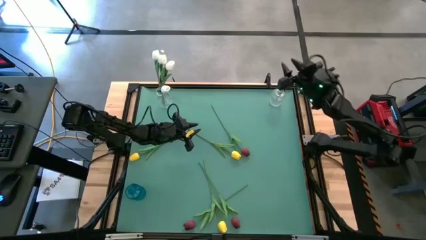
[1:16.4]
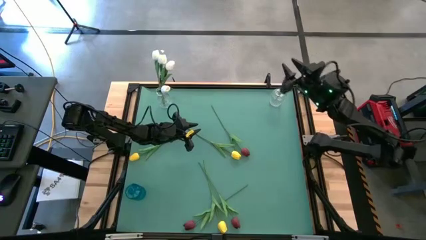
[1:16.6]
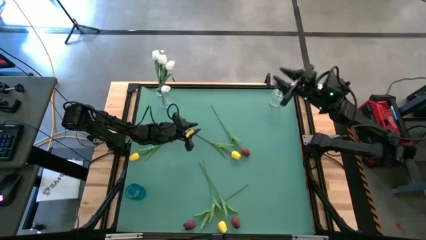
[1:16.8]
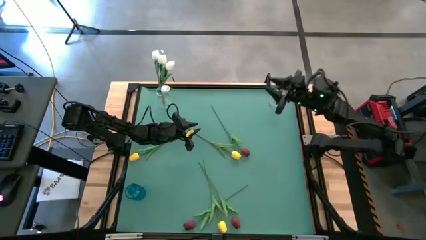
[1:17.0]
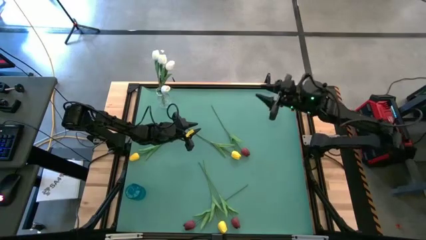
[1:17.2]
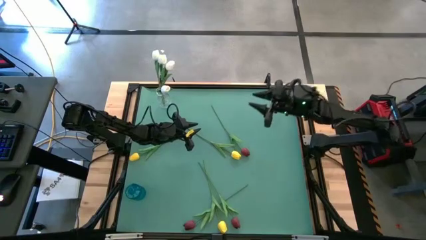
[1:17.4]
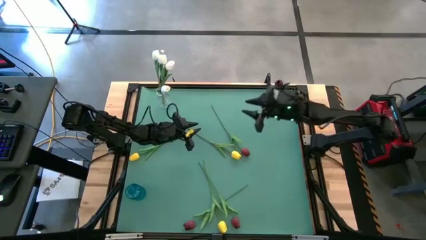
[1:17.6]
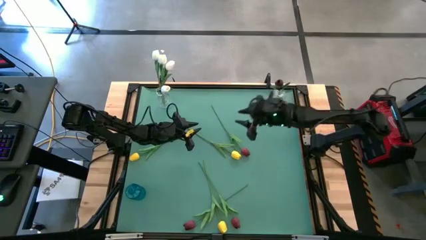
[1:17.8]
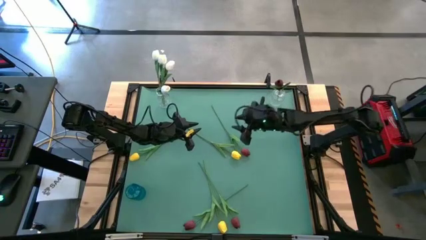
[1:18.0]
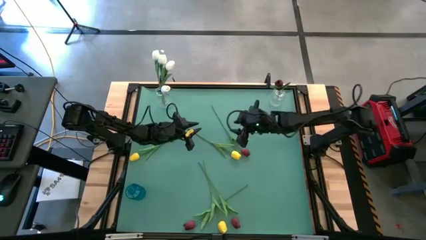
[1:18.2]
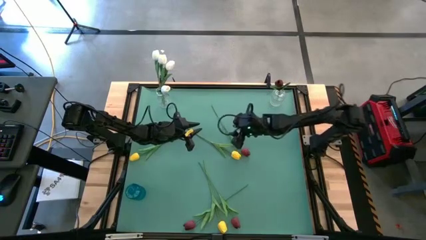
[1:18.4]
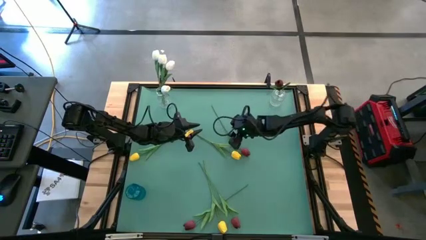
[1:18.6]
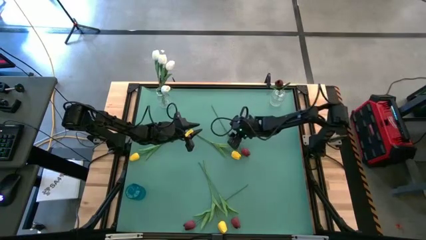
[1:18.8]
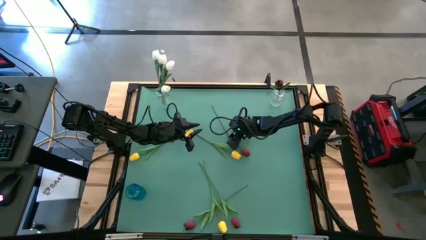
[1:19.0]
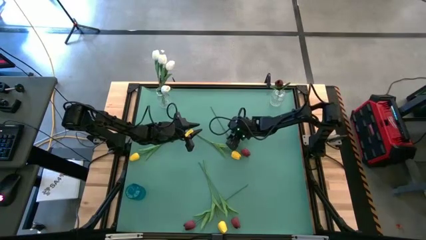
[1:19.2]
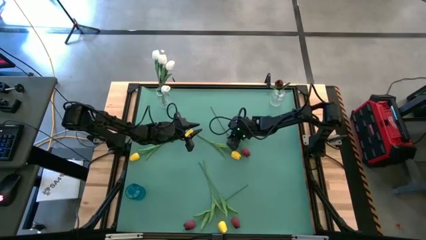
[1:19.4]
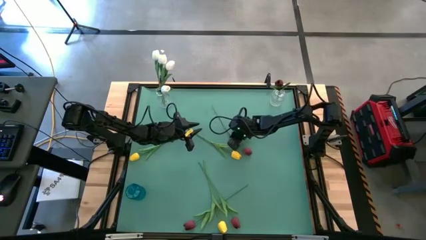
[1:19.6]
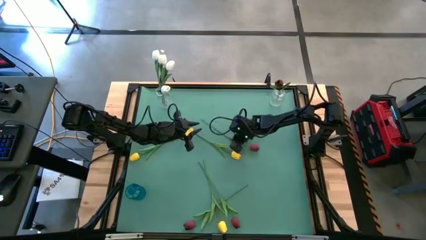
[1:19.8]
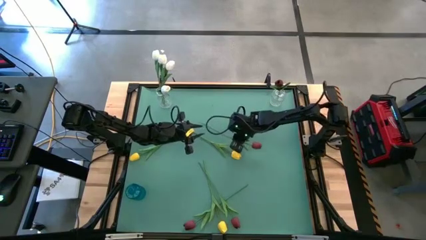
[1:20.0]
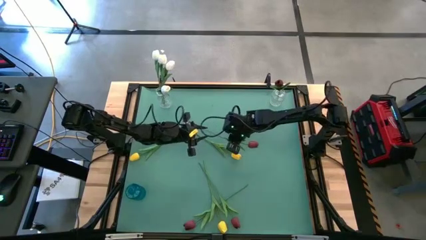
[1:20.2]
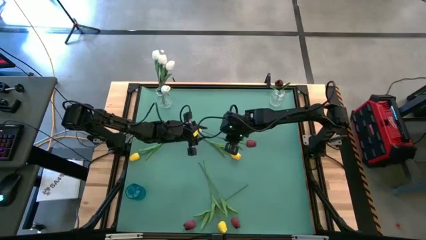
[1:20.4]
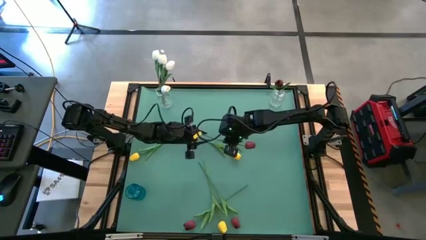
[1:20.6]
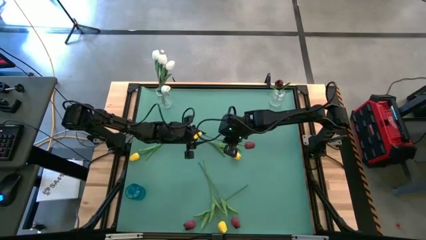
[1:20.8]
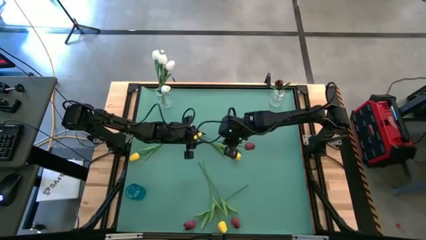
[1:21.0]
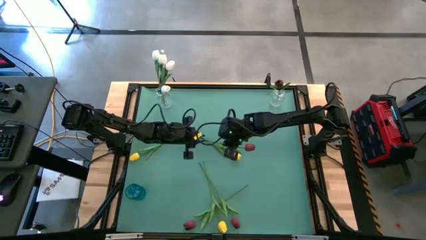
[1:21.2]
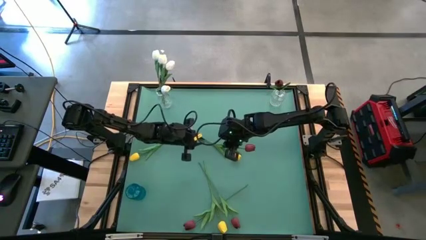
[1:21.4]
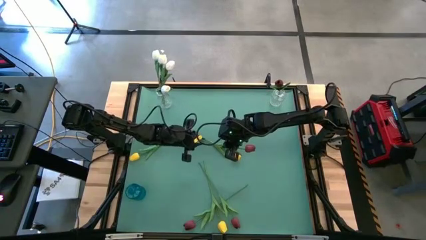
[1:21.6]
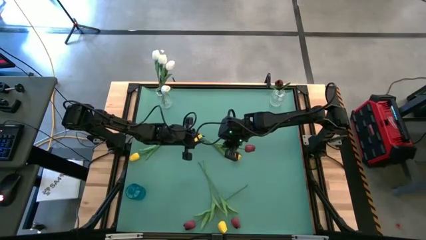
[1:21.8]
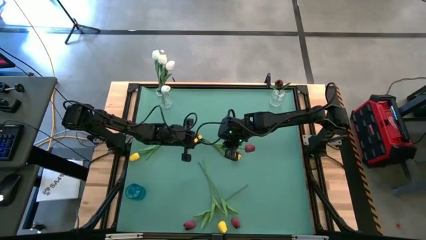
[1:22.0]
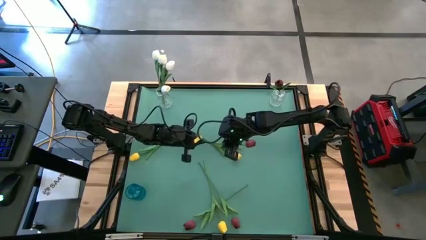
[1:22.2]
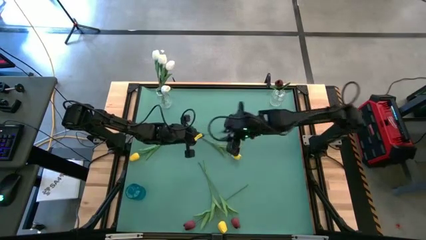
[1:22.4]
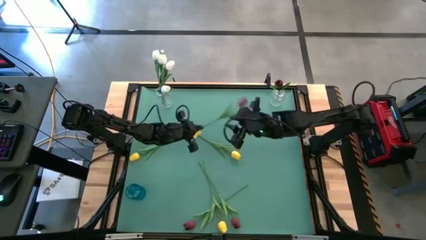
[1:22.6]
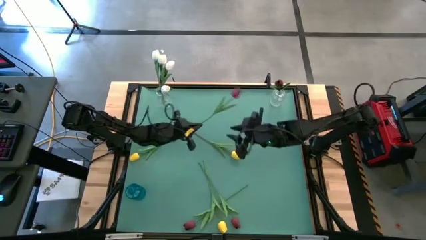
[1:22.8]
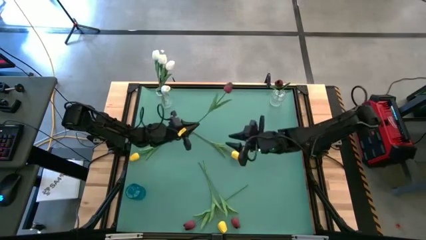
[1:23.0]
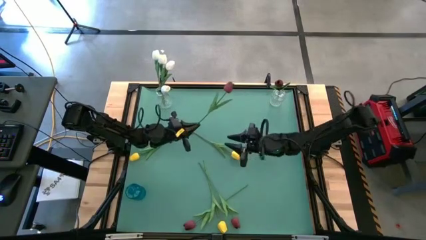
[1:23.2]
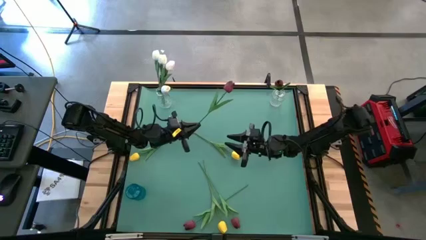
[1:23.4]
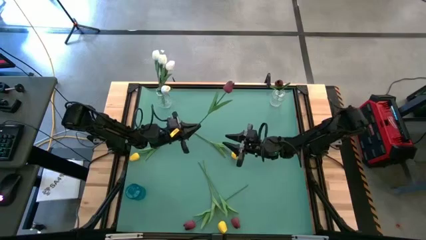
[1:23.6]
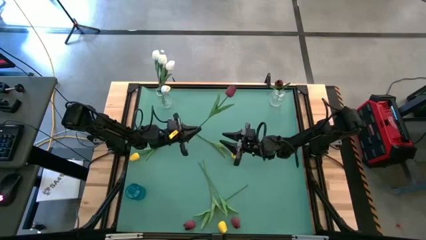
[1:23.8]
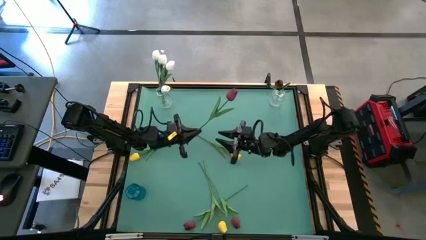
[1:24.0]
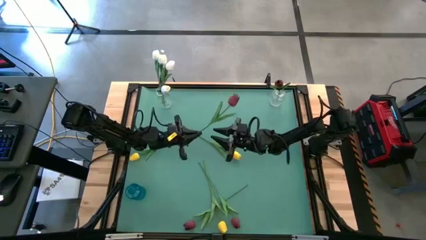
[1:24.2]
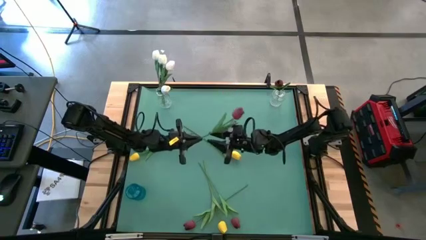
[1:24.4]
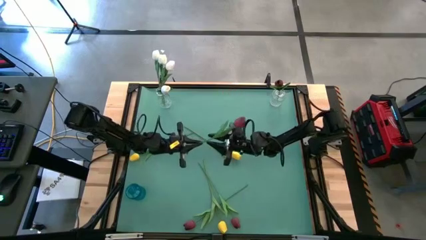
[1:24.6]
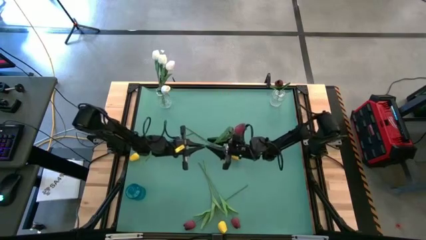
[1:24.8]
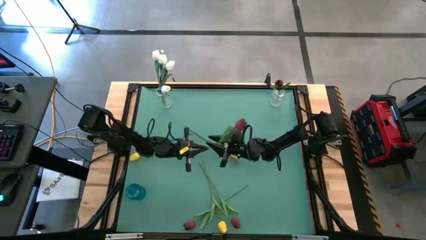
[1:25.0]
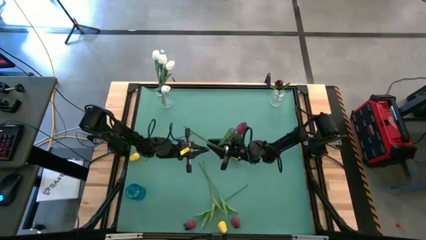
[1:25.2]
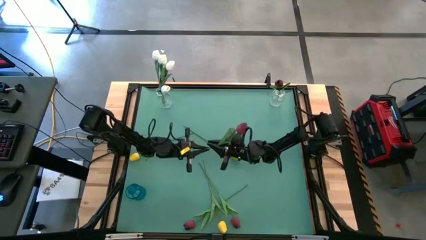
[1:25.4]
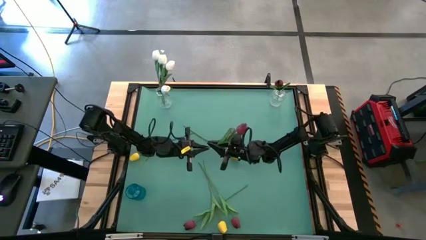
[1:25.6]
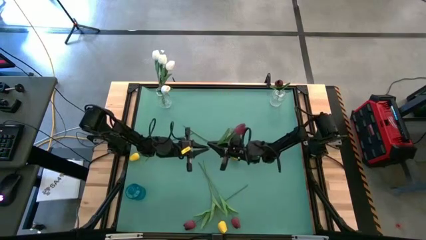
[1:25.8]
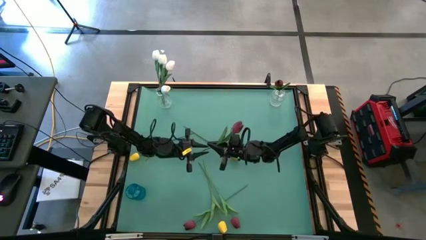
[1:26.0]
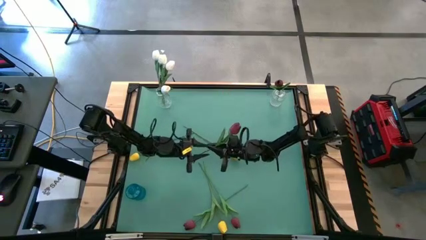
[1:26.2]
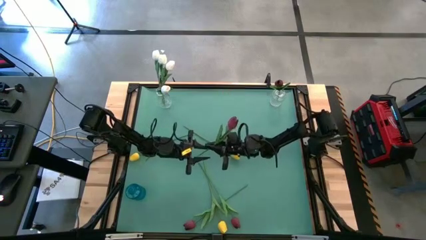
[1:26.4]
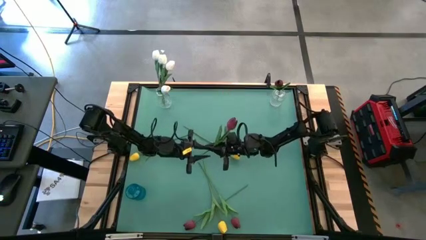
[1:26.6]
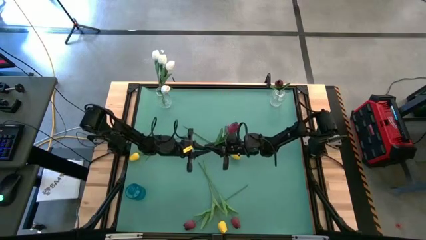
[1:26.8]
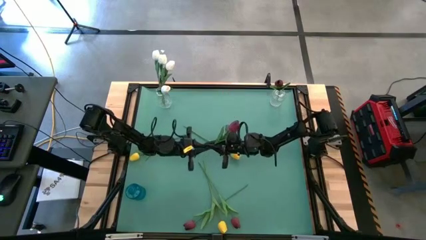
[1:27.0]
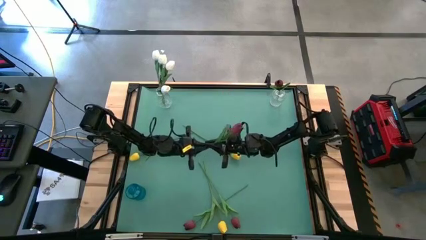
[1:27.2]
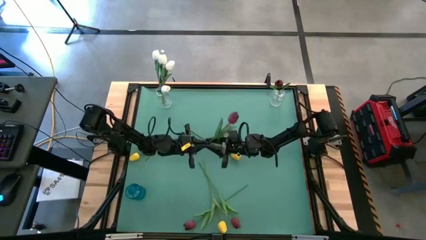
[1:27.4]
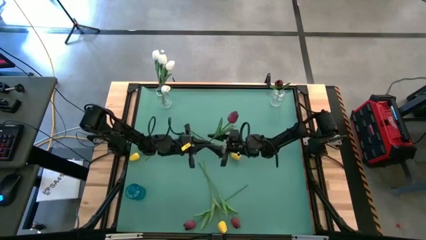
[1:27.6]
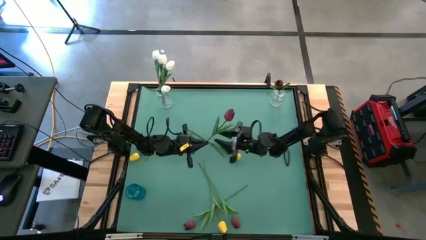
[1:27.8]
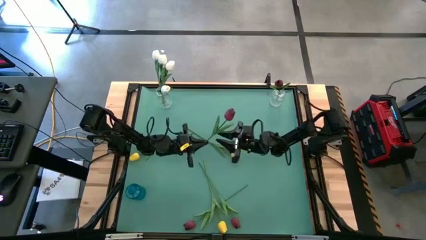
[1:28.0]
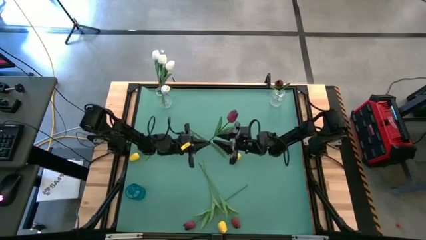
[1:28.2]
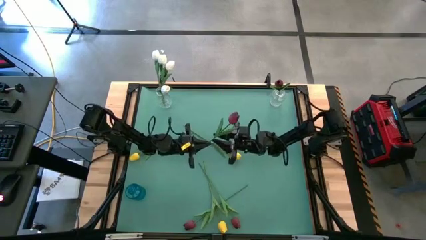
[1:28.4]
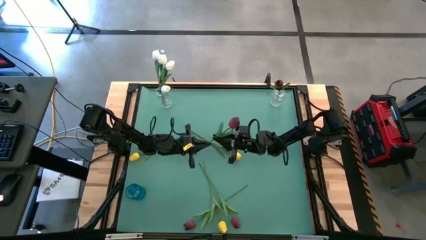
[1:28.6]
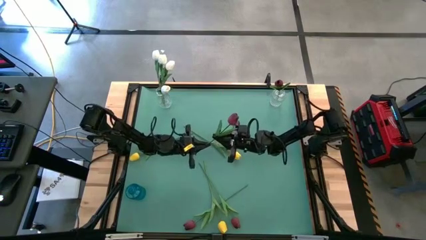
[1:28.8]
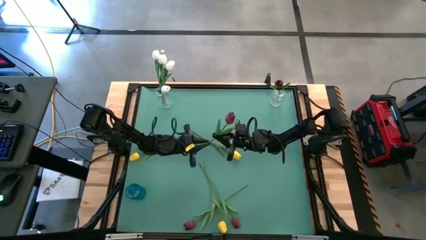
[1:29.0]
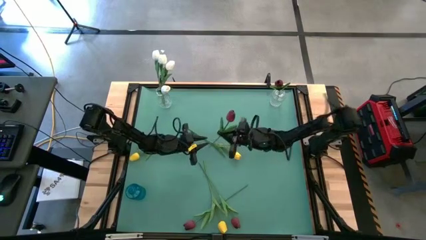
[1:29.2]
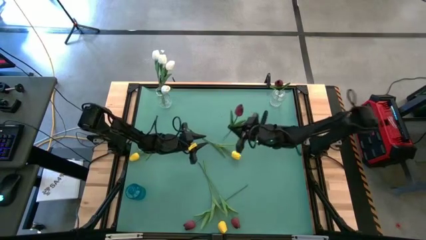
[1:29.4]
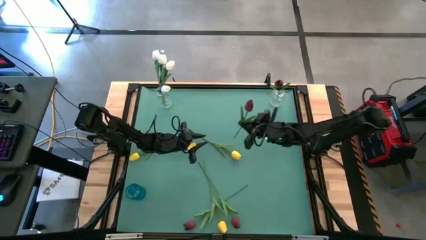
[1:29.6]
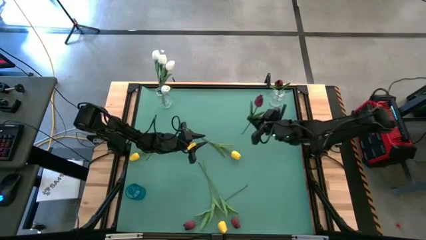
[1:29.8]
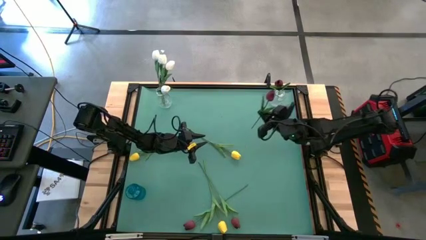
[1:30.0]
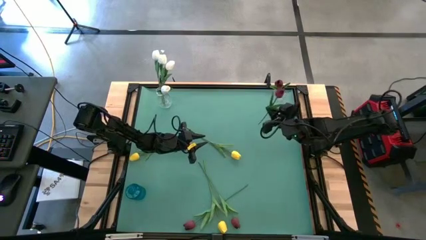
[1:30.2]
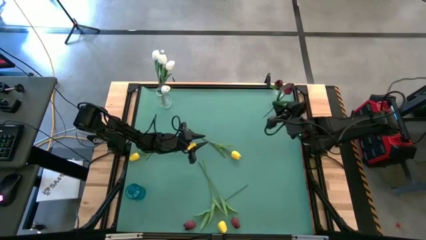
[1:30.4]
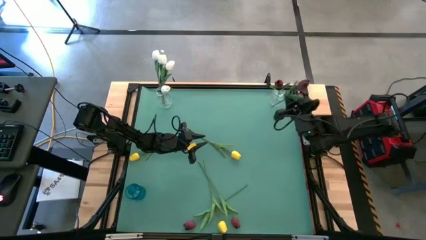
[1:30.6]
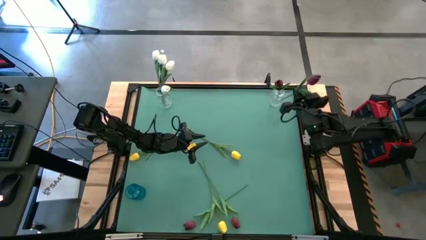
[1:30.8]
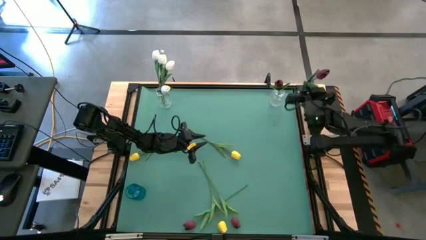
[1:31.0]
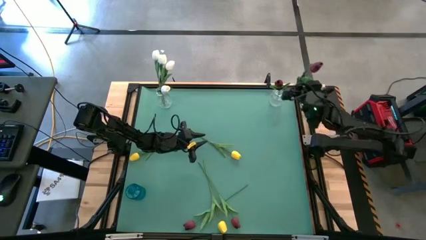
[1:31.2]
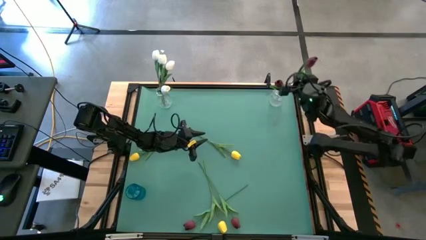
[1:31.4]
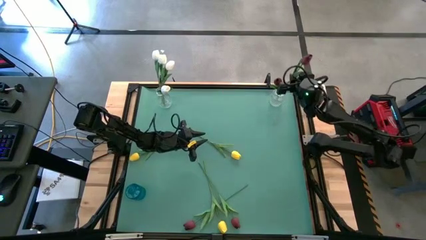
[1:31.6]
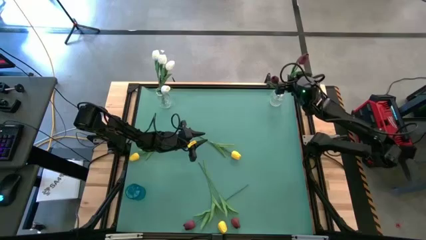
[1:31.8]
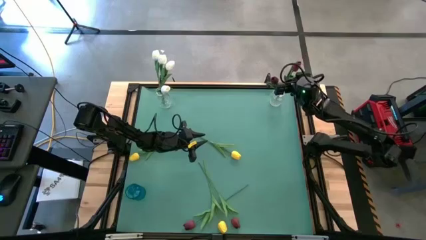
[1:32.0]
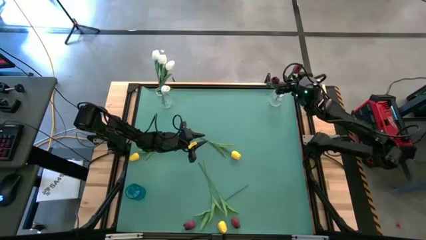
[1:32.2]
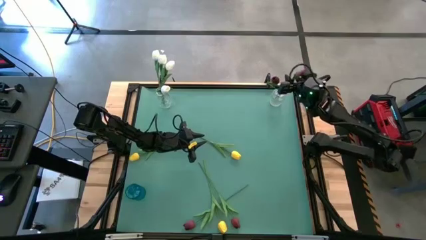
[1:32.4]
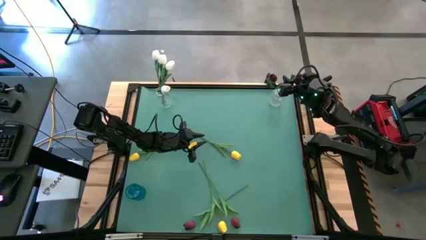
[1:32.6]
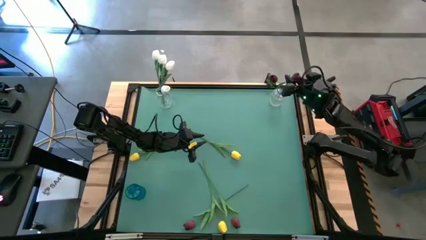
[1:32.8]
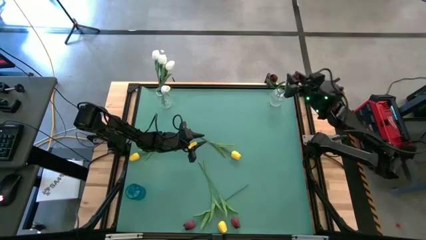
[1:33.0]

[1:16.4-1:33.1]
Task: Sort flowers into vase by color
Put the red flower into the right transparent vase
